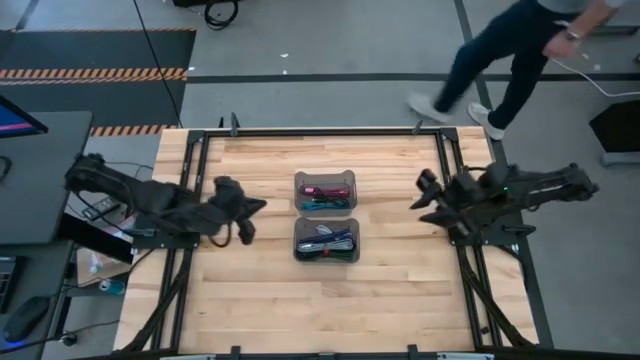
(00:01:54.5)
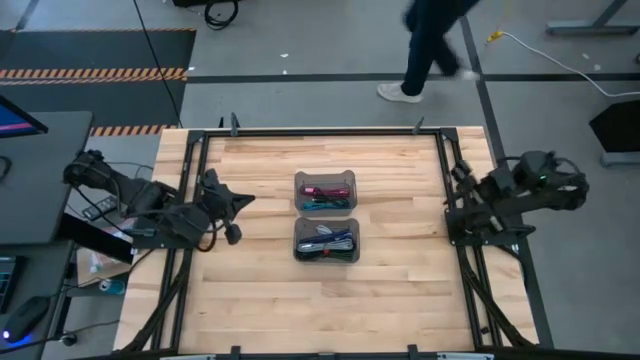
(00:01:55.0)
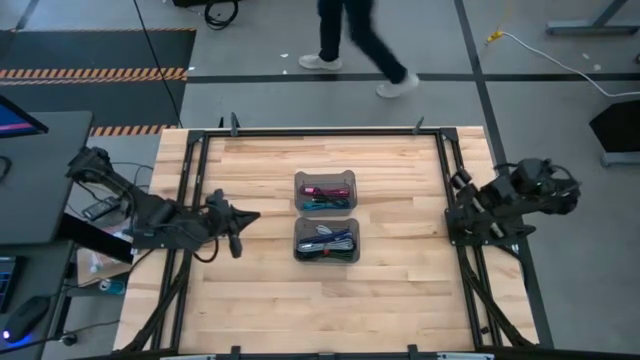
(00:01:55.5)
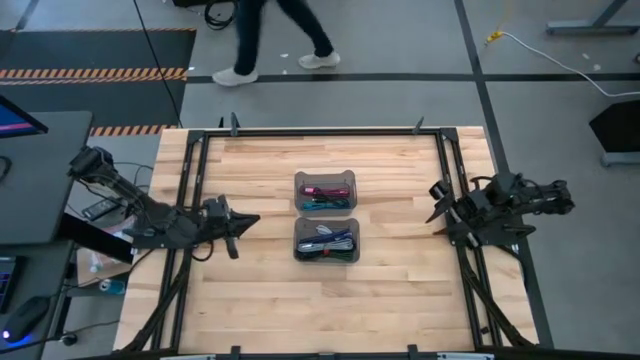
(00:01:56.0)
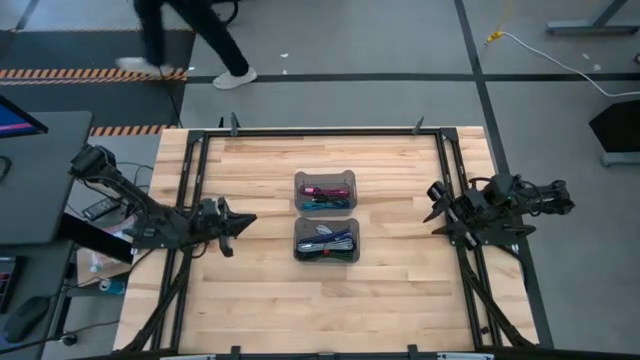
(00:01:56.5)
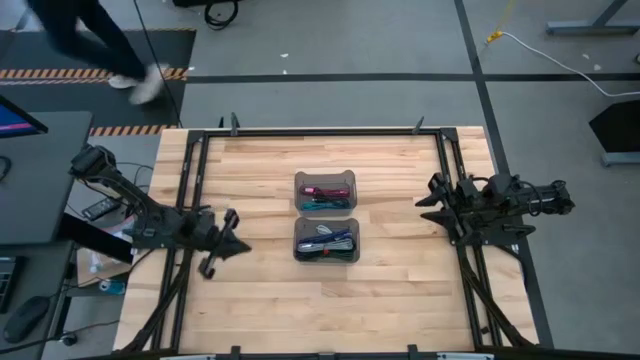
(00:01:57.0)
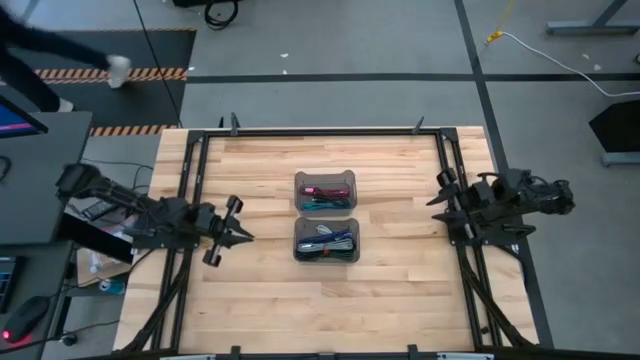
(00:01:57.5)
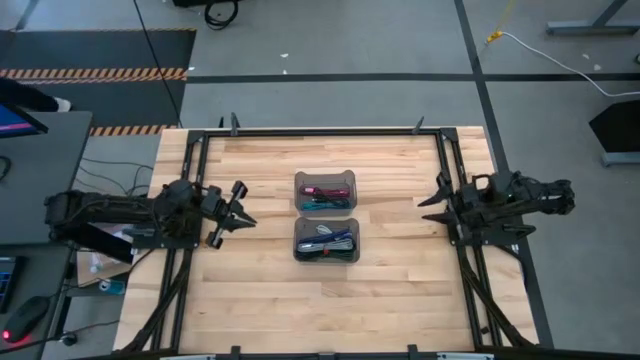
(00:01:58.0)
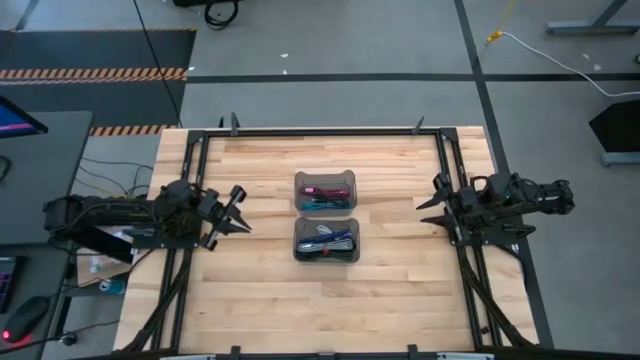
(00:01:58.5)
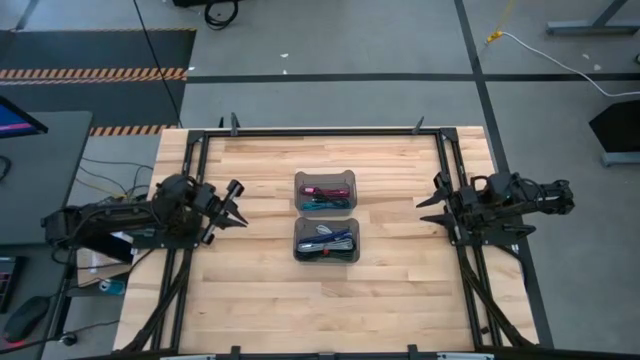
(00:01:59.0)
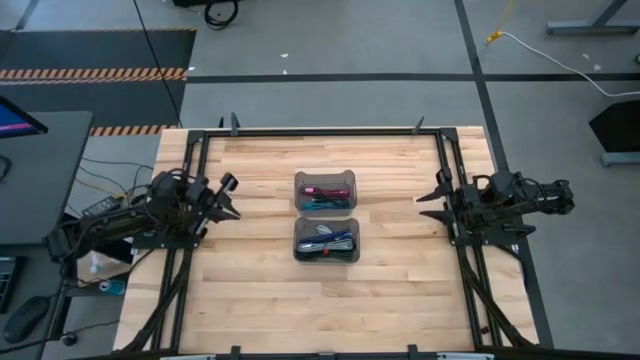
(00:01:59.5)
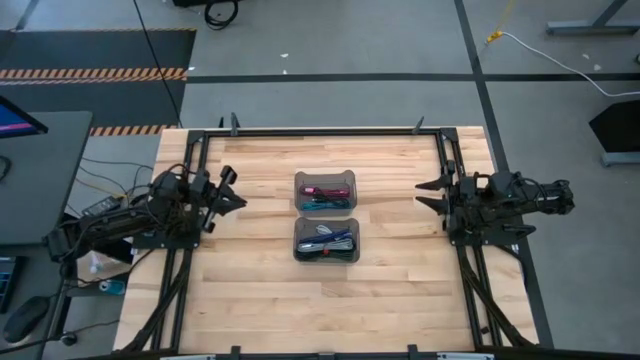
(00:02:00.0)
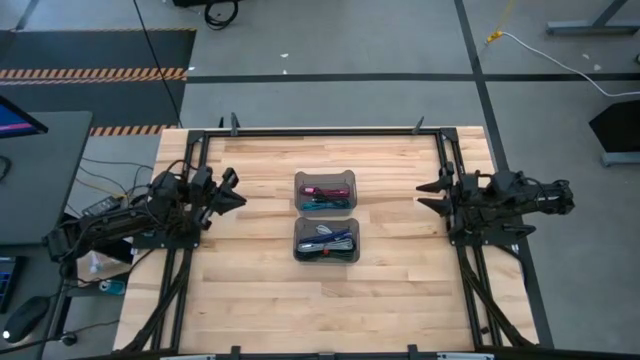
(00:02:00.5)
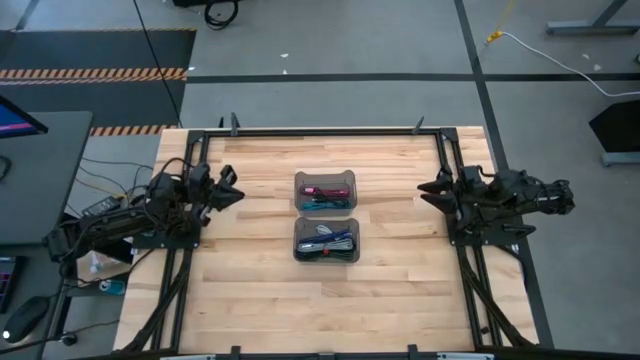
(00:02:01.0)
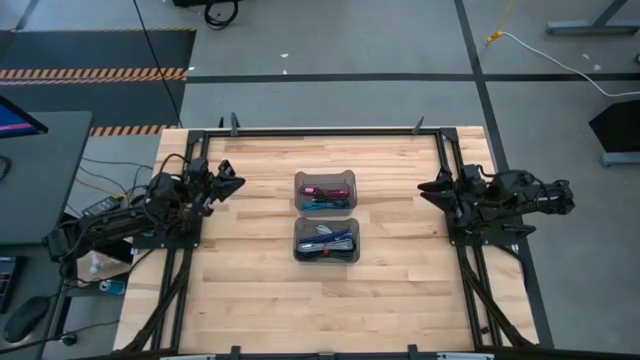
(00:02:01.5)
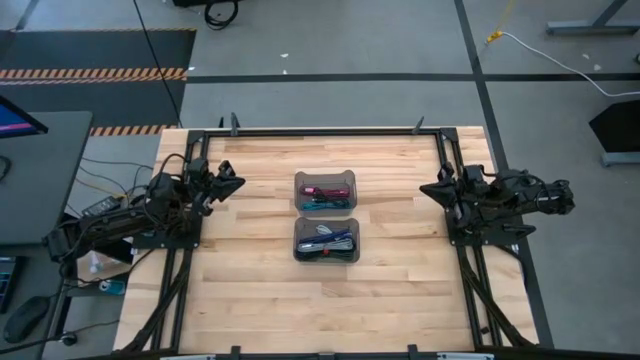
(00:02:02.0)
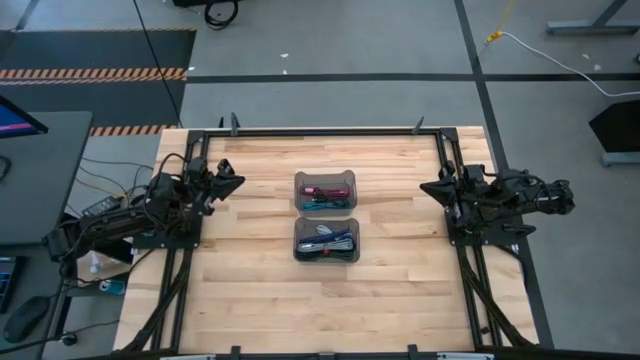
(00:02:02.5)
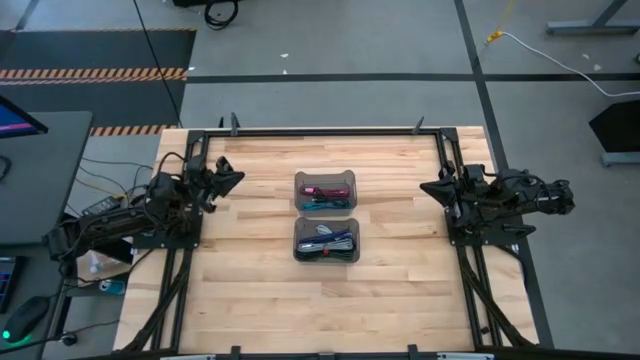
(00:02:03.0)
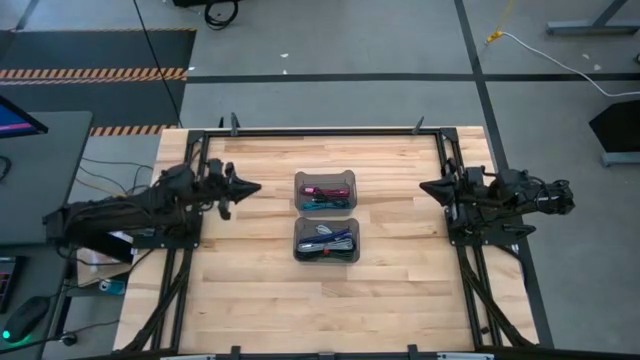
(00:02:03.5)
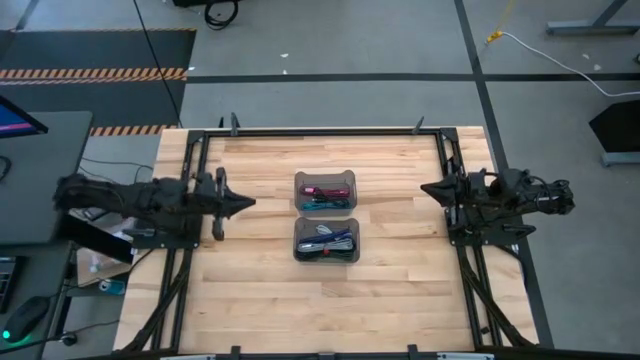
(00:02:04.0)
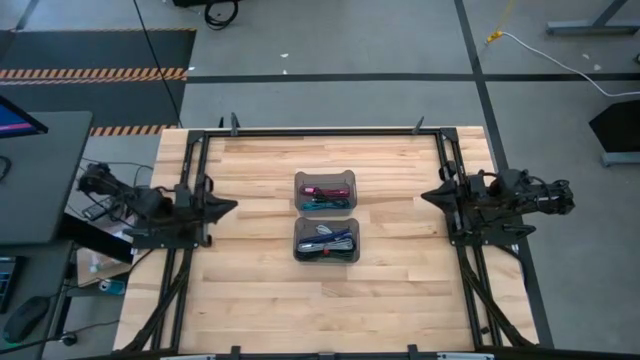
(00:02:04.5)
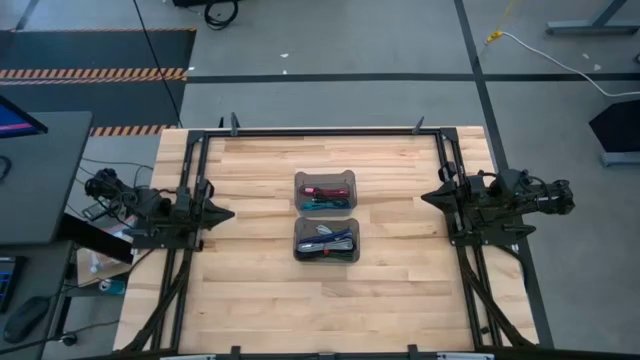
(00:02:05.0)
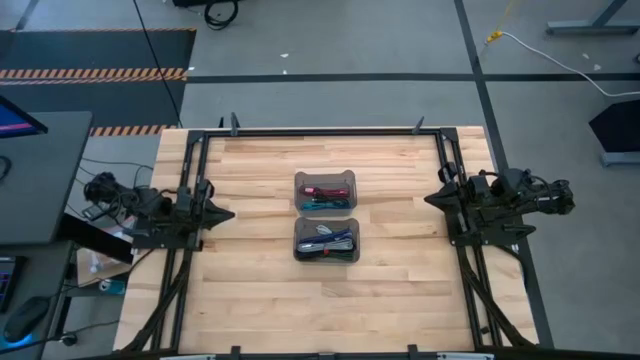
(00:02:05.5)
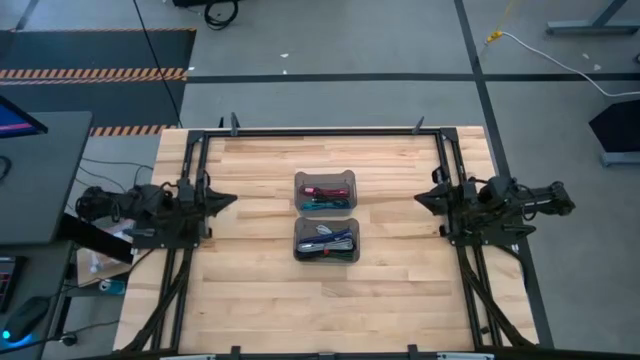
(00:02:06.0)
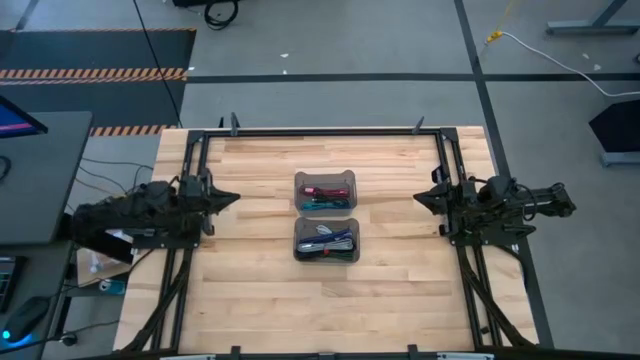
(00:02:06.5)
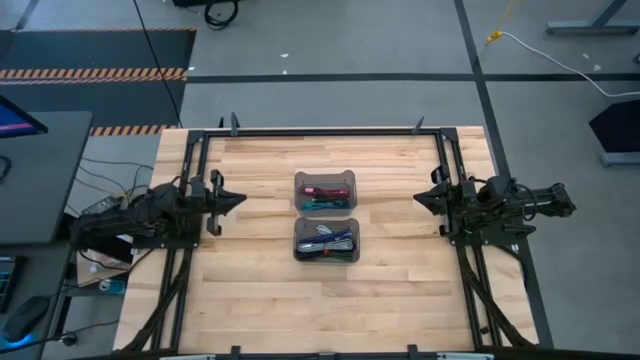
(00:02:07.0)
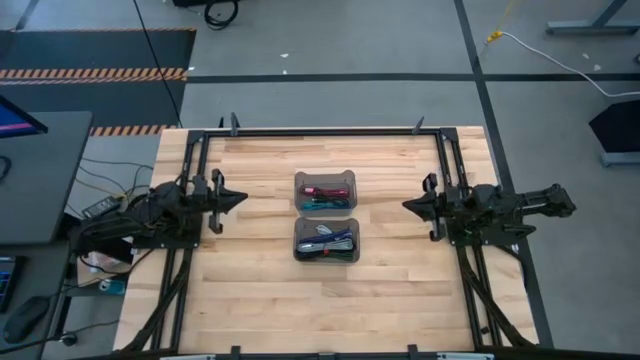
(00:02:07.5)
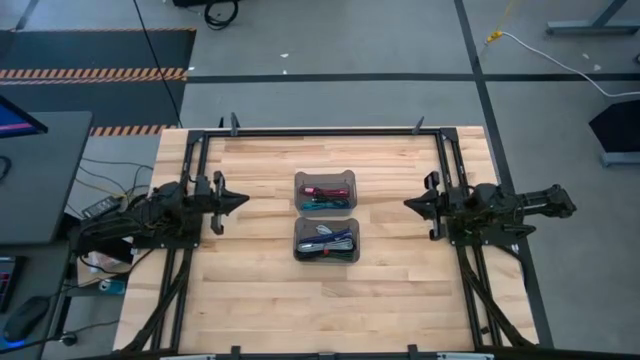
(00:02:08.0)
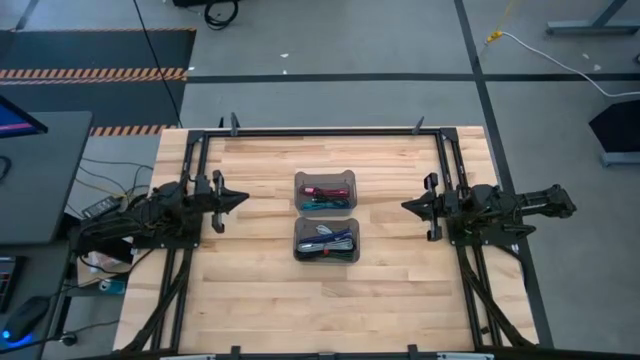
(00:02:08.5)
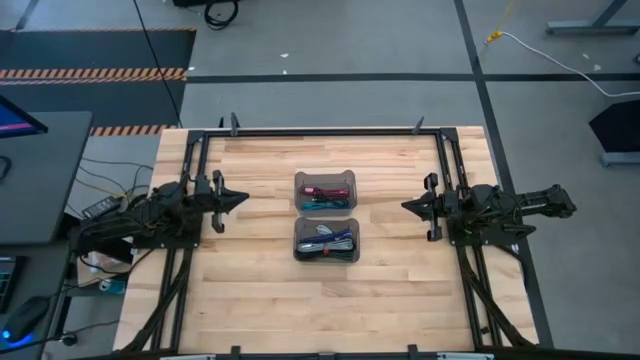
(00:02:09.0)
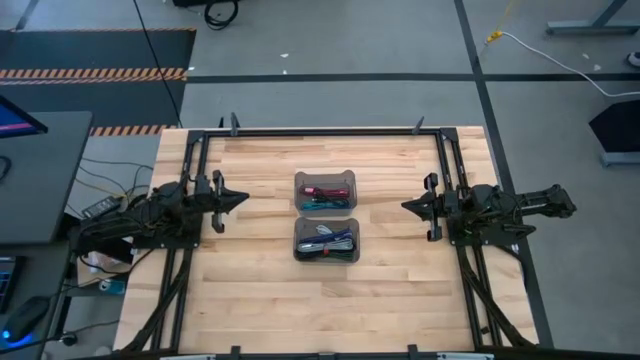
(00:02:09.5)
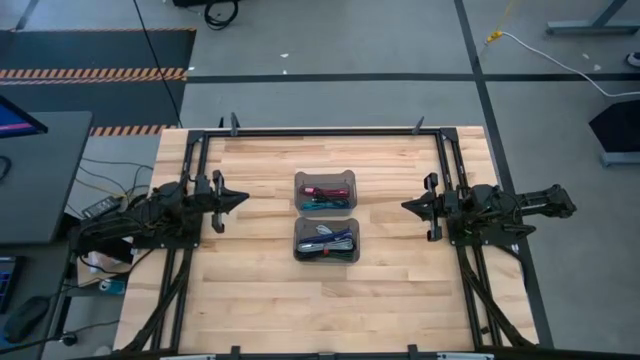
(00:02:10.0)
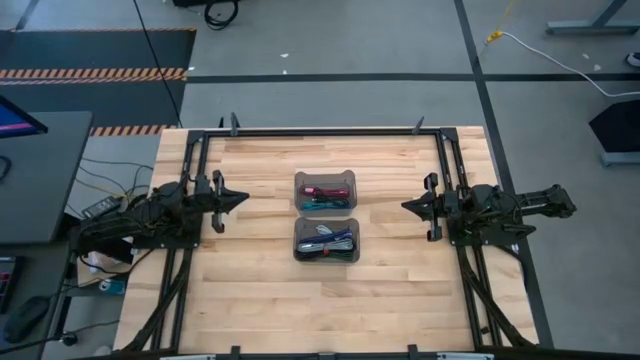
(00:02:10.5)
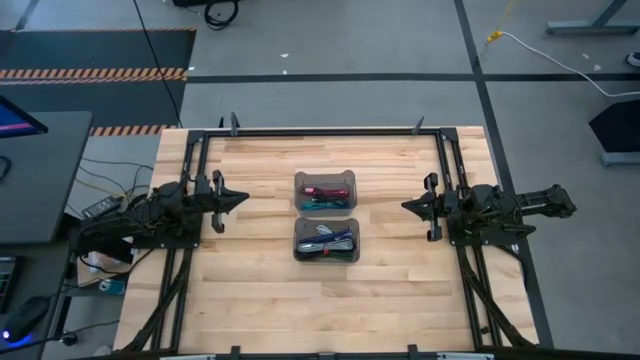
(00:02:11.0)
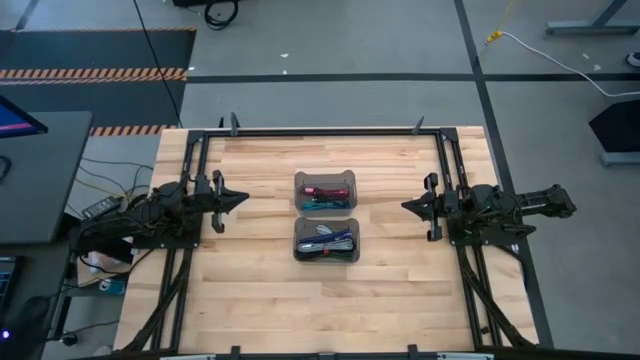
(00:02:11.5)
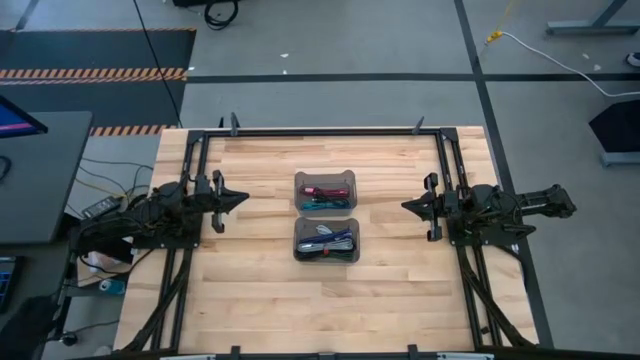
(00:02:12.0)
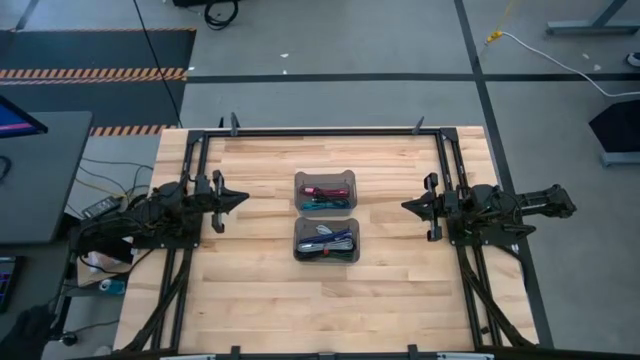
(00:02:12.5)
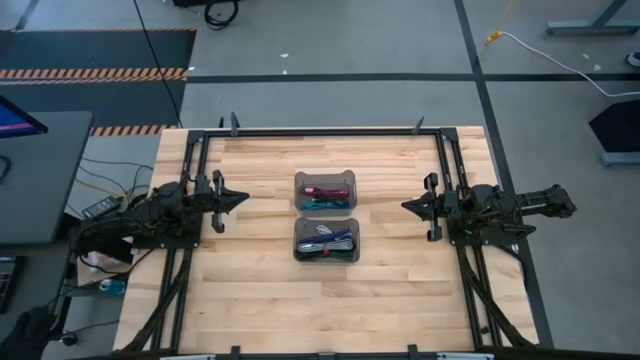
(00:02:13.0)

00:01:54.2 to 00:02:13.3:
Task: Pick and place USB-C Cables
Return to Home Position
